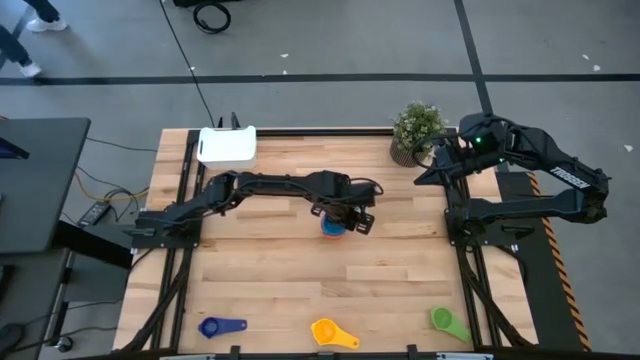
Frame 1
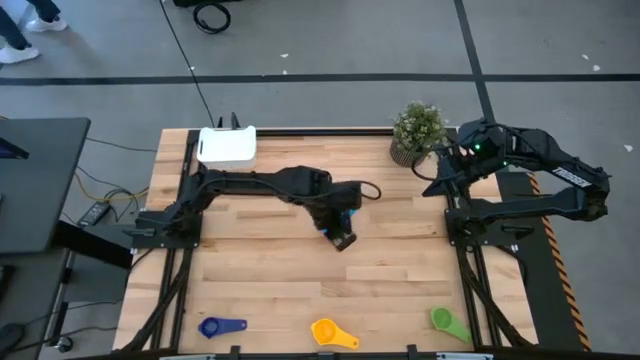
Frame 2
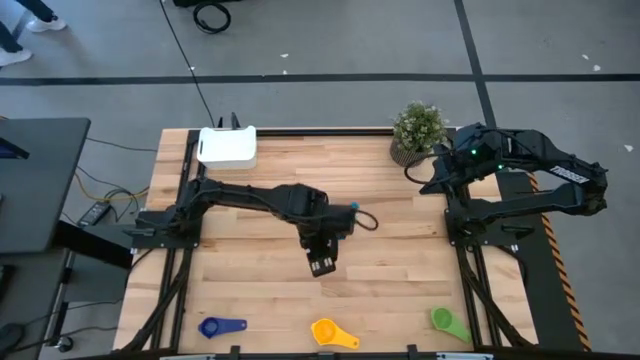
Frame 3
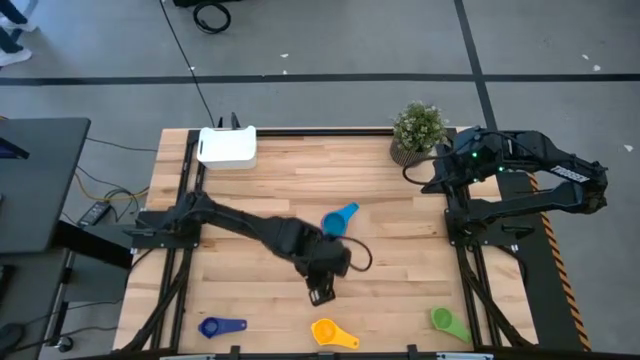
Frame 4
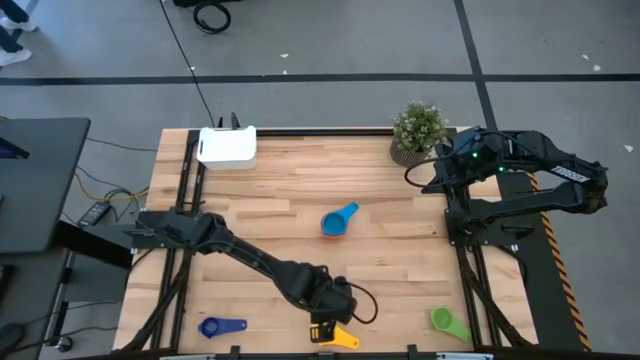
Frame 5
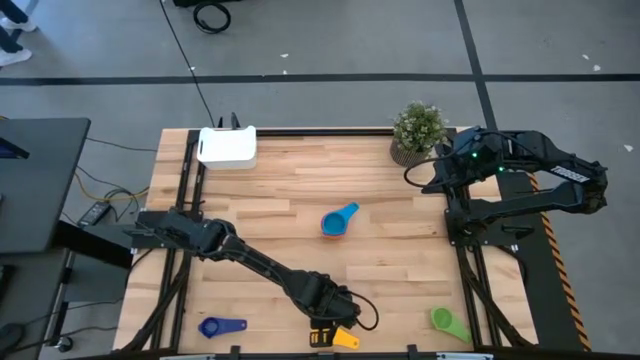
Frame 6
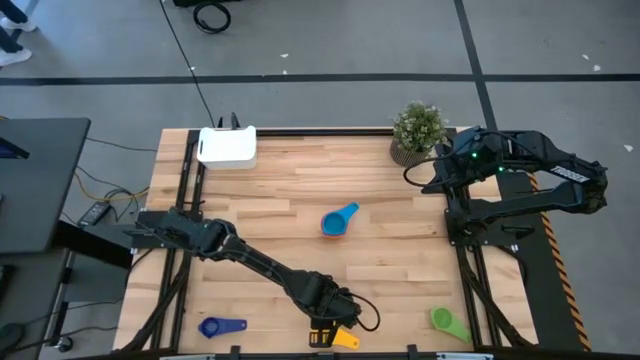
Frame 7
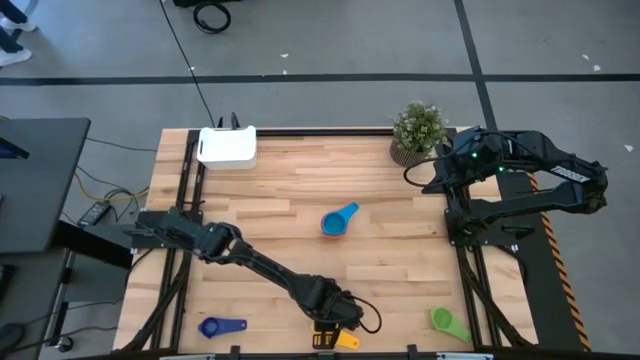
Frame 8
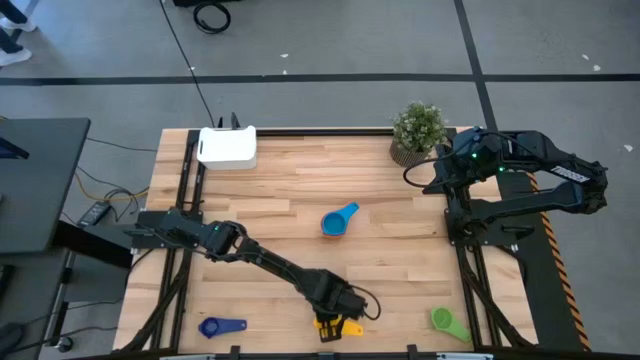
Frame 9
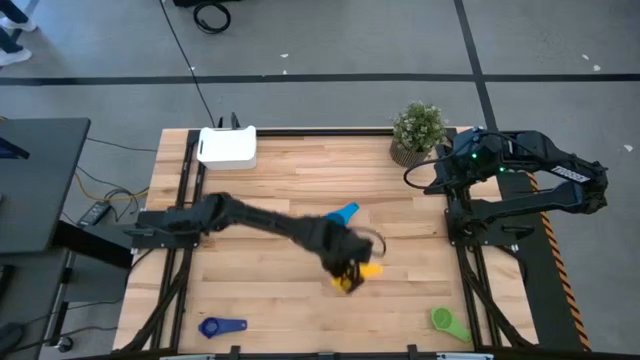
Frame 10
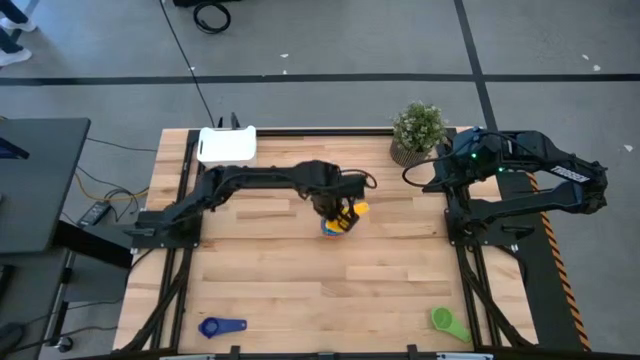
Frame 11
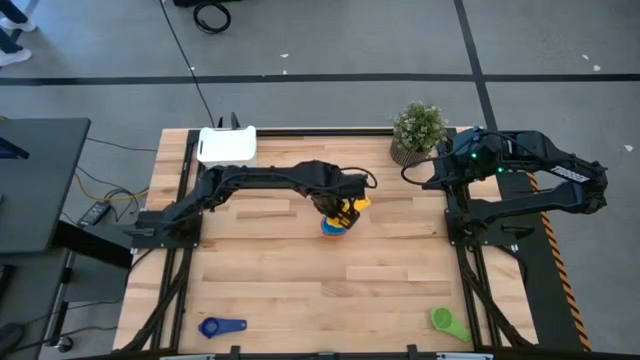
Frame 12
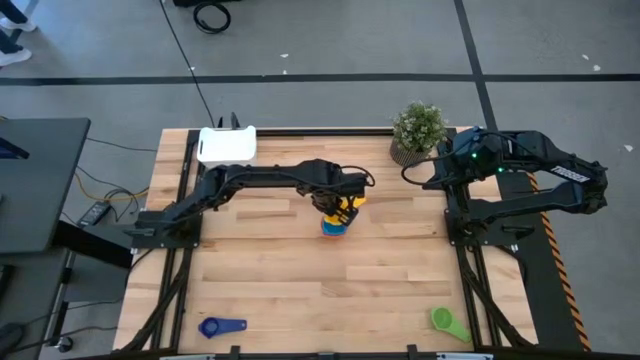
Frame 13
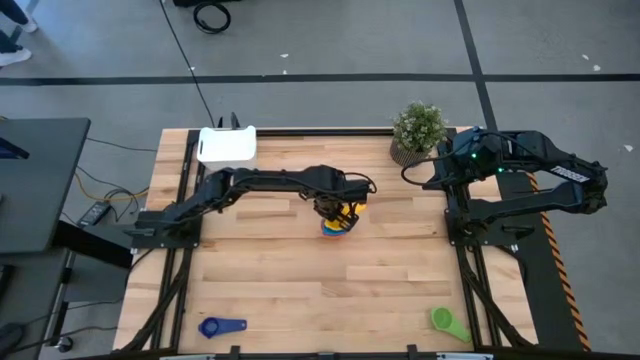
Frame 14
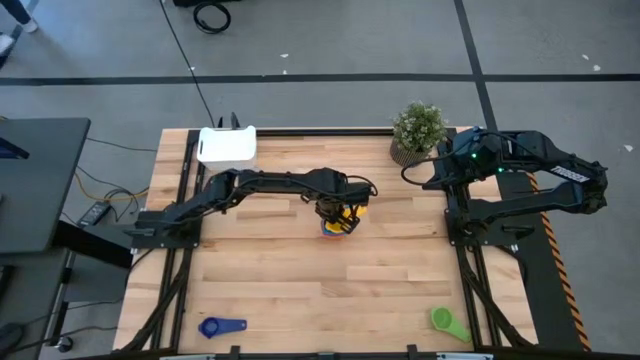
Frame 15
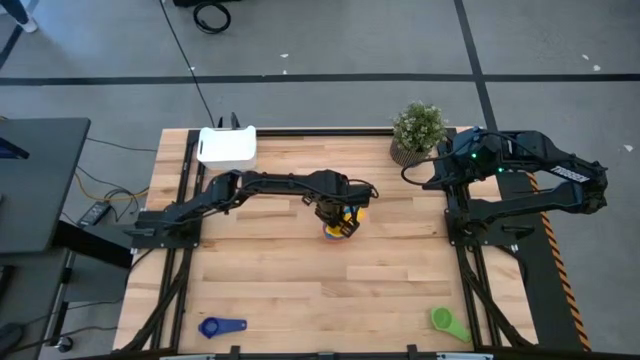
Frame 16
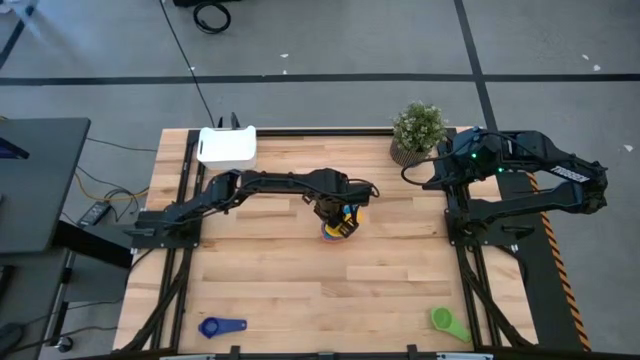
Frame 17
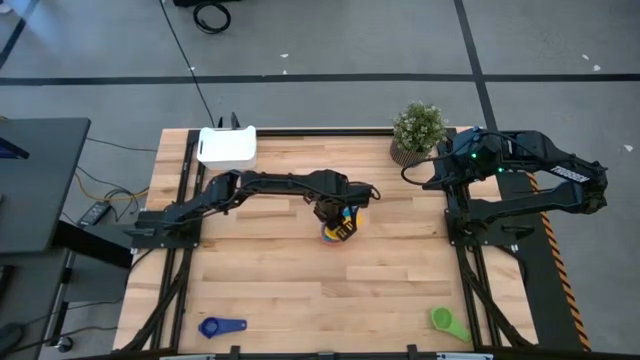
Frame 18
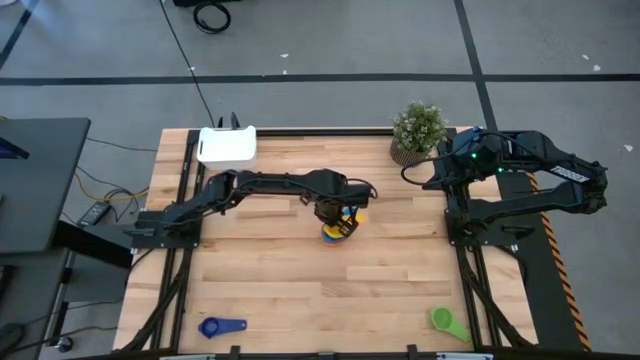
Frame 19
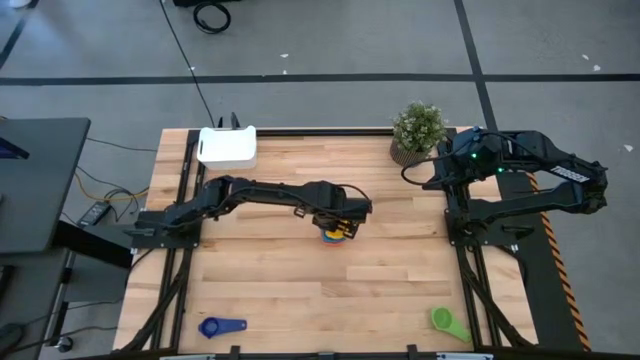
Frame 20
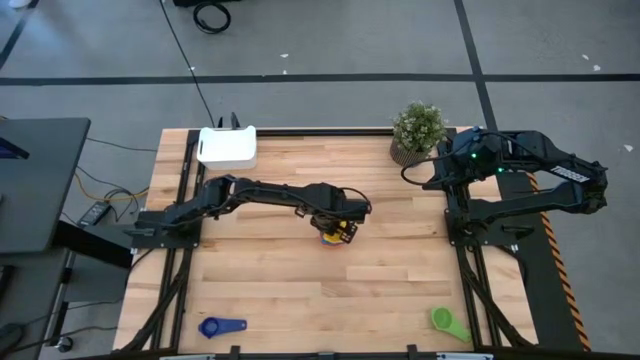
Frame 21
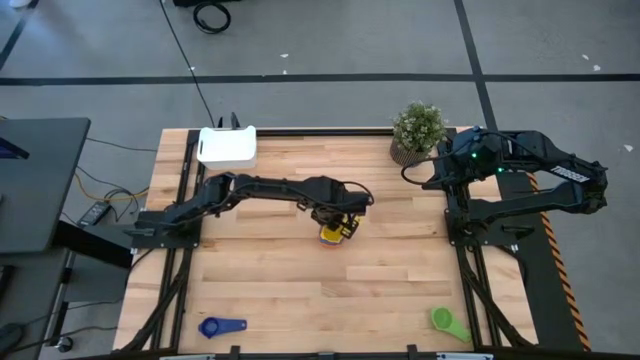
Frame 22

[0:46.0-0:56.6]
Task: Nest measuring cups in basket
Stack the yellow measuring cup on top of the light blue measuring cup

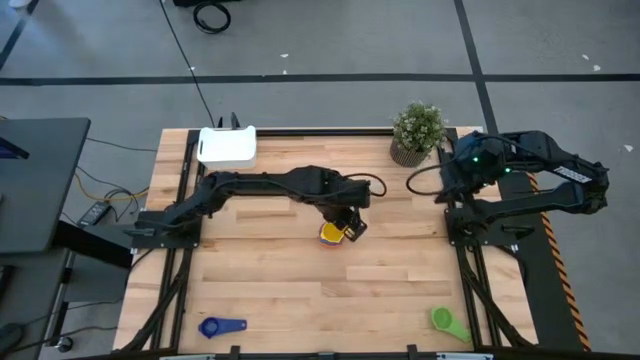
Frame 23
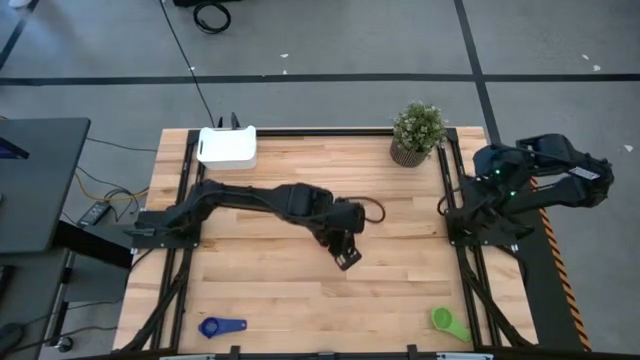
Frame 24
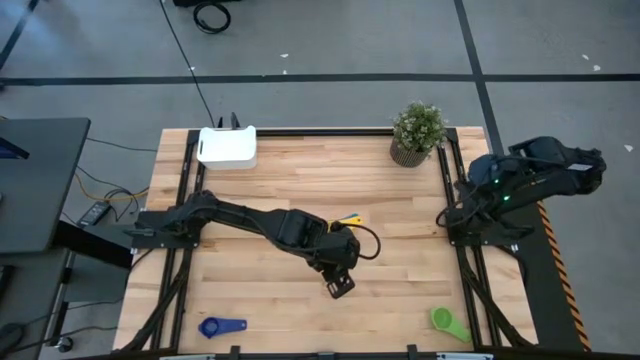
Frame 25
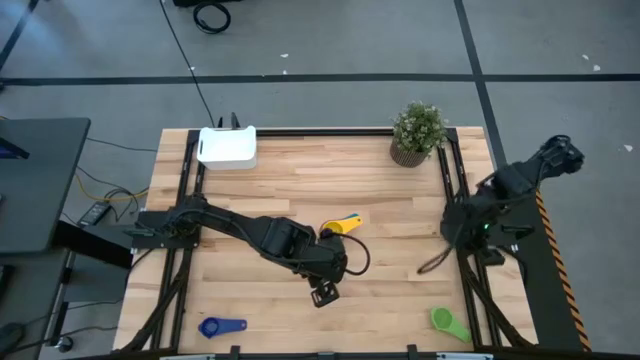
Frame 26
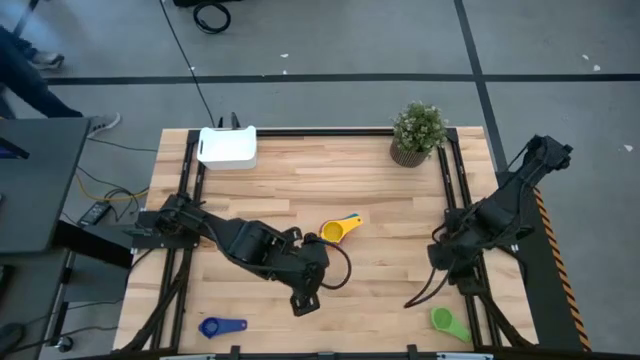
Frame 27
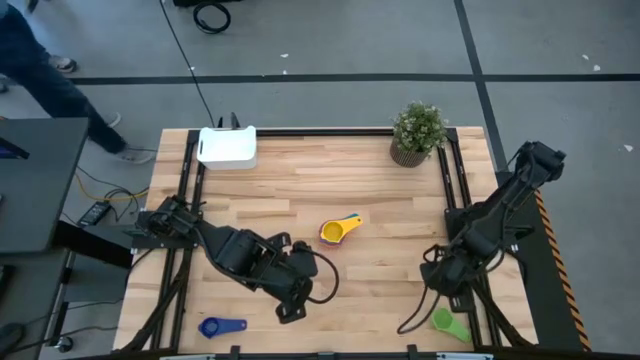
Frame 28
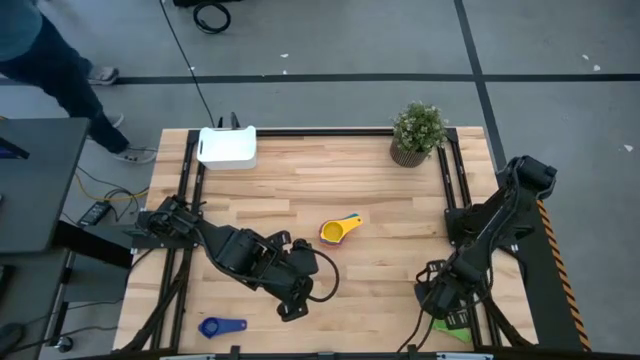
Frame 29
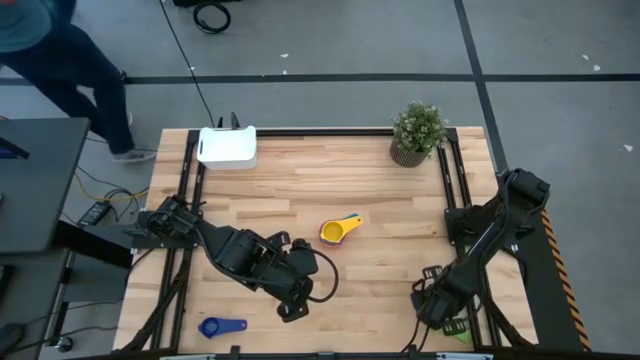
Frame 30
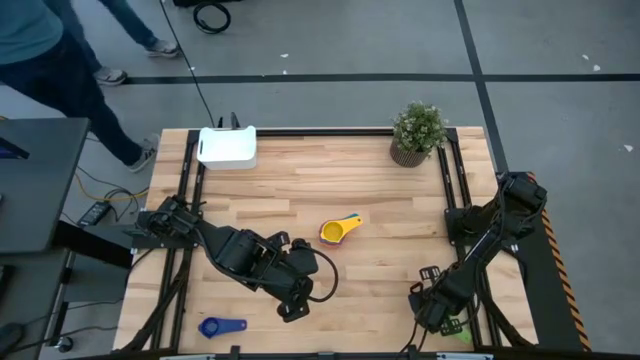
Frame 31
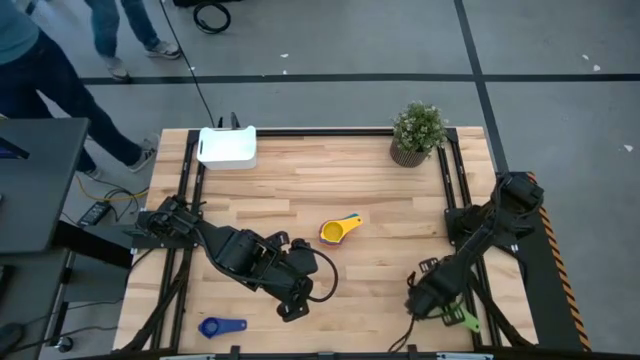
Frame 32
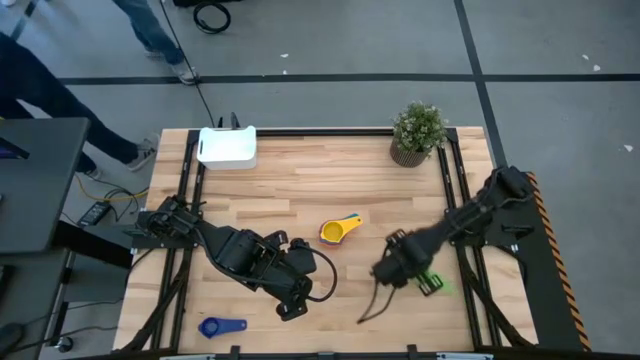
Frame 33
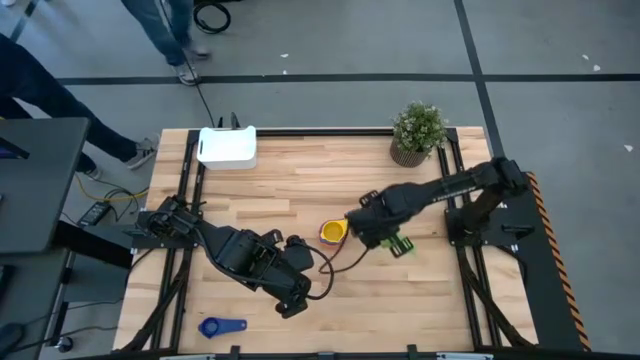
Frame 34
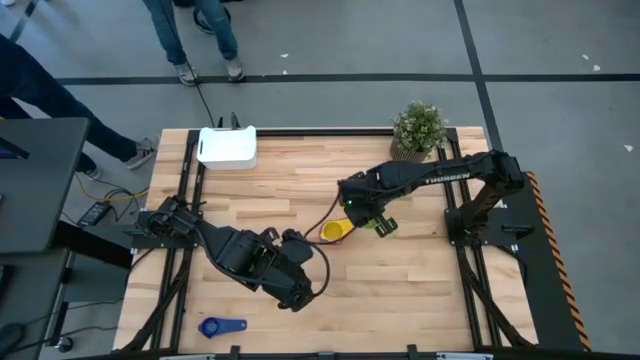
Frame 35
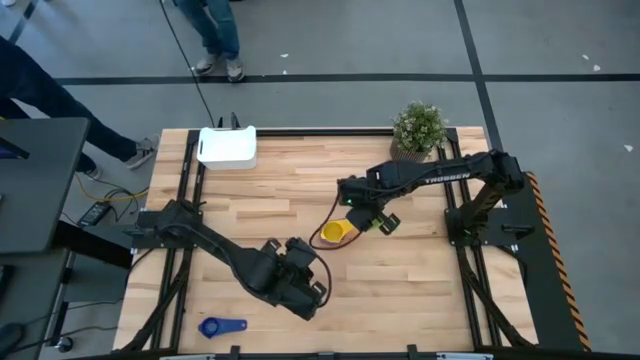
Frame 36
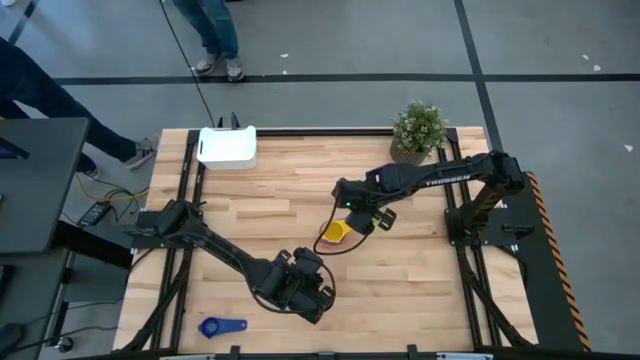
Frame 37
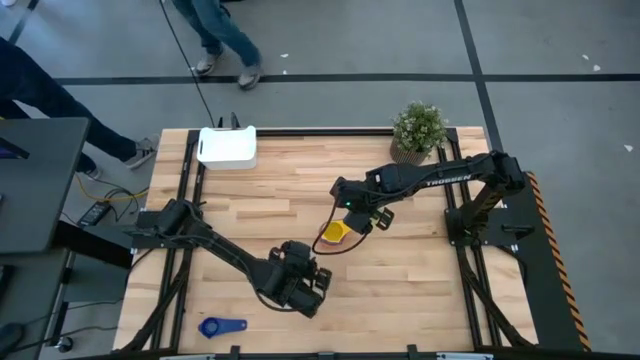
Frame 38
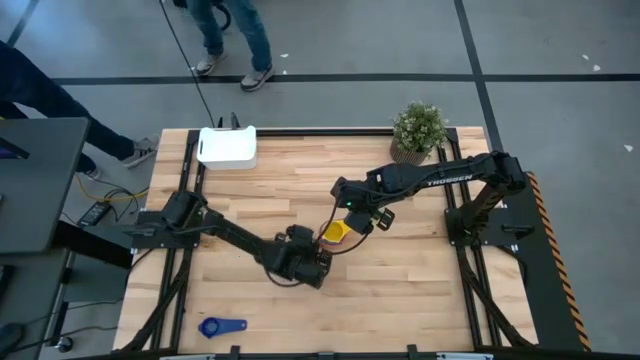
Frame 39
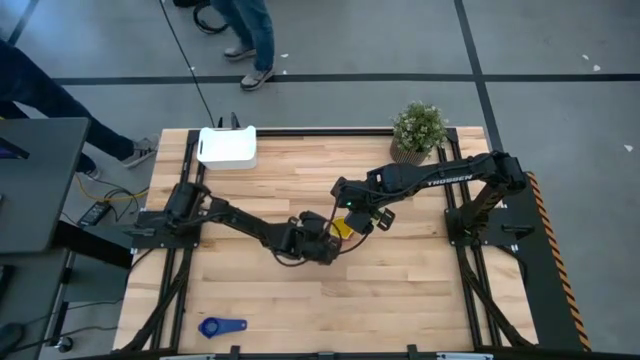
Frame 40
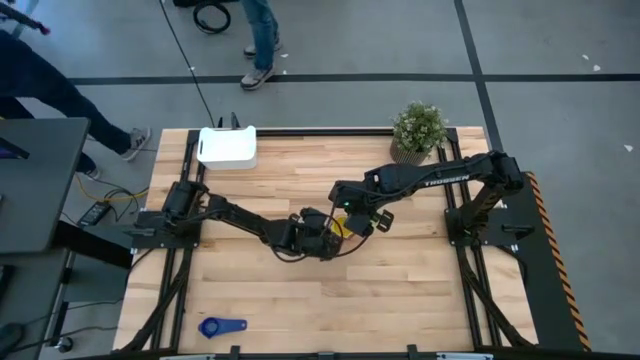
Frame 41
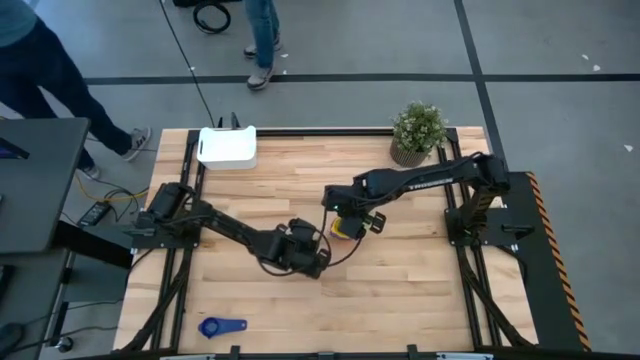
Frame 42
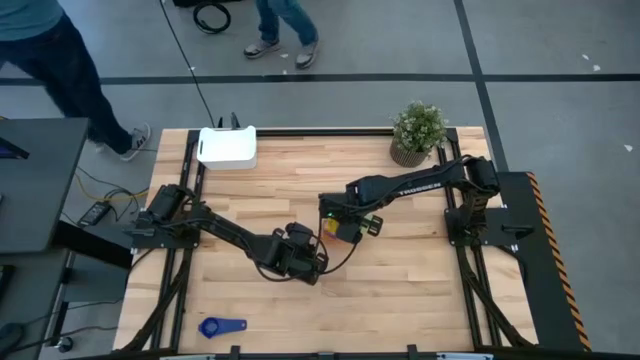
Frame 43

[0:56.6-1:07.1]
Stack the green measuring cup on top of the yellow measuring cup
